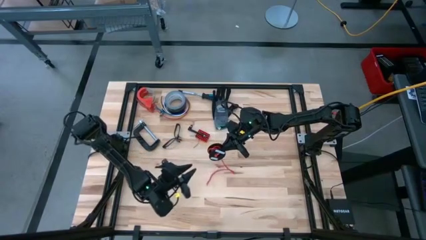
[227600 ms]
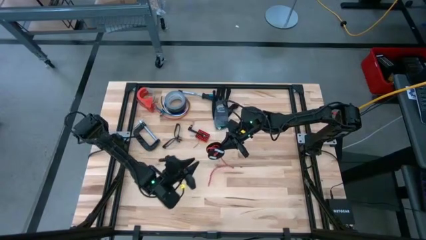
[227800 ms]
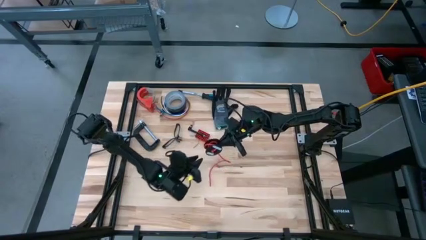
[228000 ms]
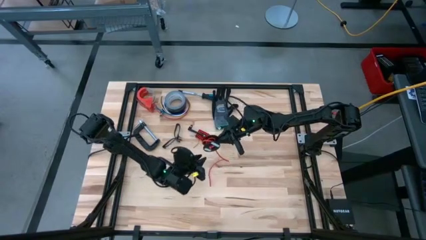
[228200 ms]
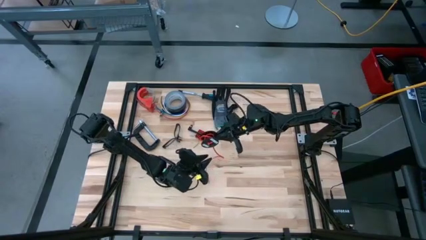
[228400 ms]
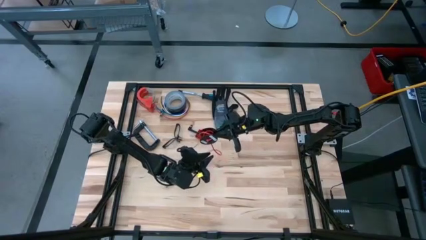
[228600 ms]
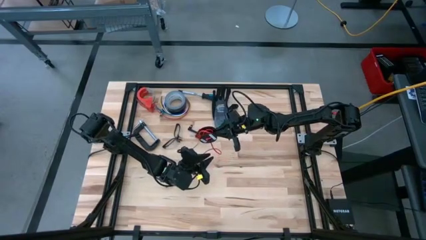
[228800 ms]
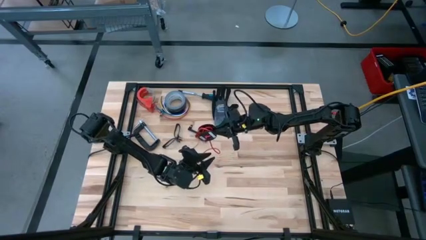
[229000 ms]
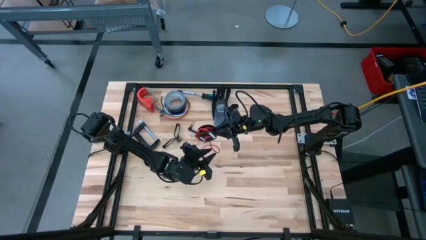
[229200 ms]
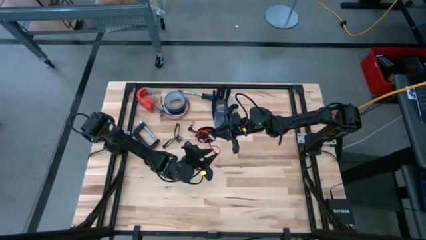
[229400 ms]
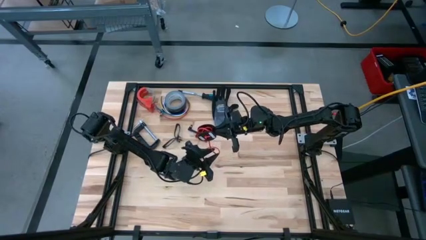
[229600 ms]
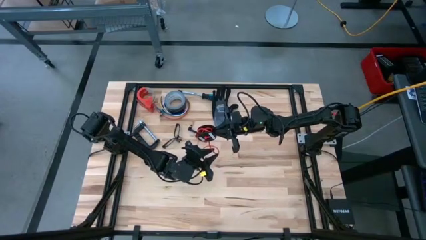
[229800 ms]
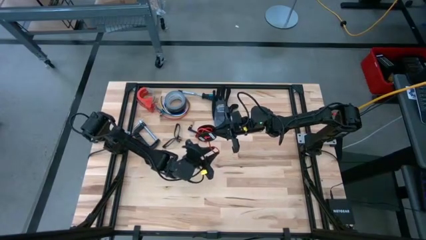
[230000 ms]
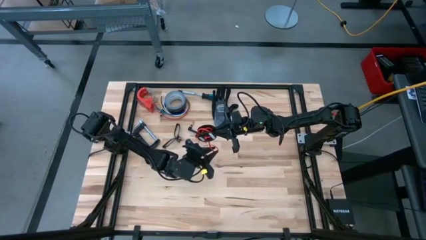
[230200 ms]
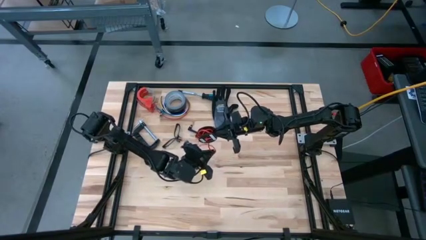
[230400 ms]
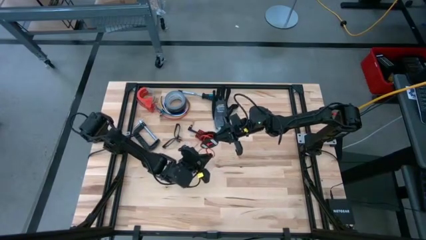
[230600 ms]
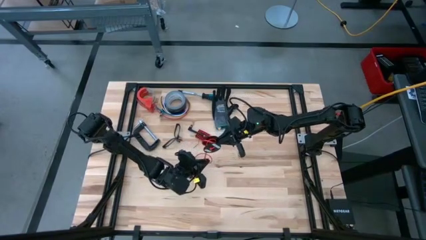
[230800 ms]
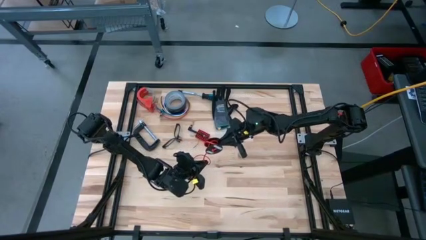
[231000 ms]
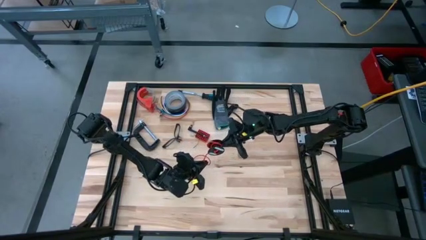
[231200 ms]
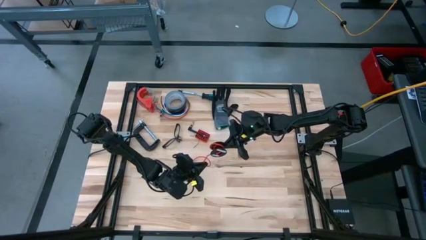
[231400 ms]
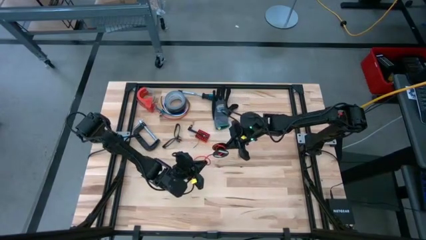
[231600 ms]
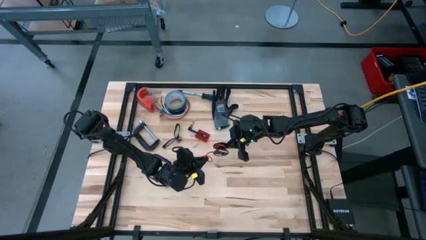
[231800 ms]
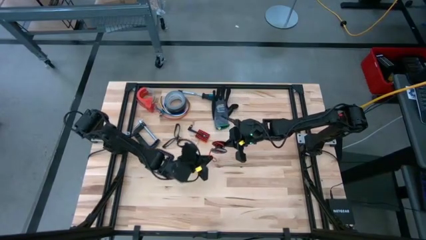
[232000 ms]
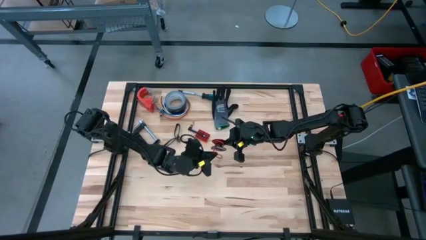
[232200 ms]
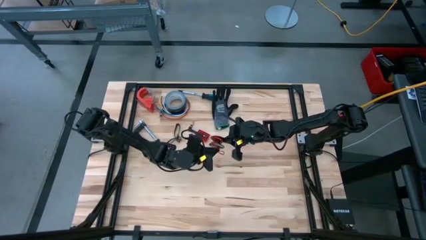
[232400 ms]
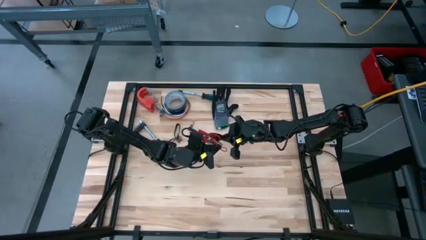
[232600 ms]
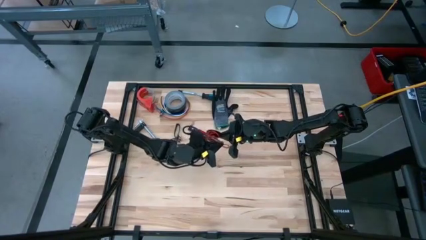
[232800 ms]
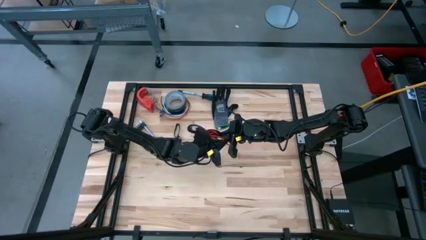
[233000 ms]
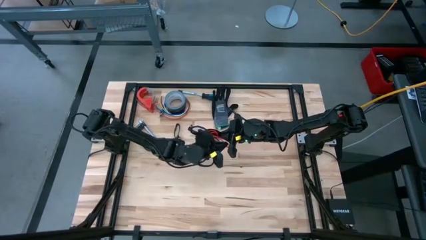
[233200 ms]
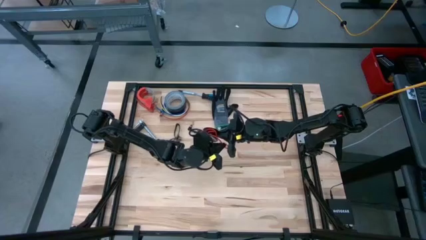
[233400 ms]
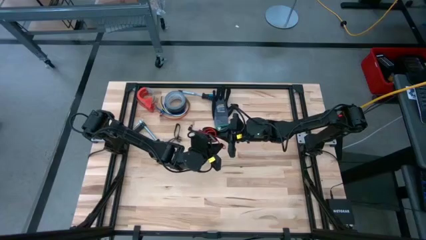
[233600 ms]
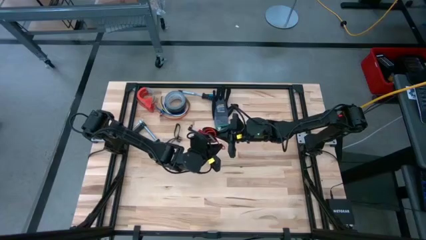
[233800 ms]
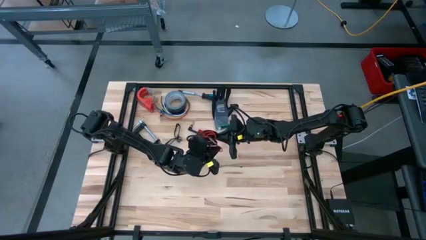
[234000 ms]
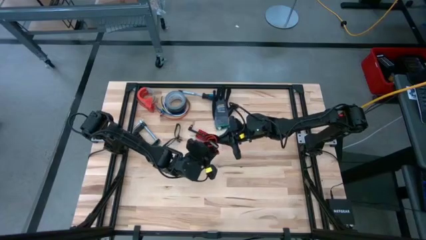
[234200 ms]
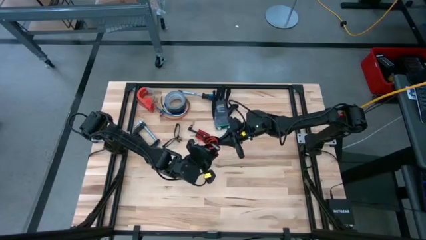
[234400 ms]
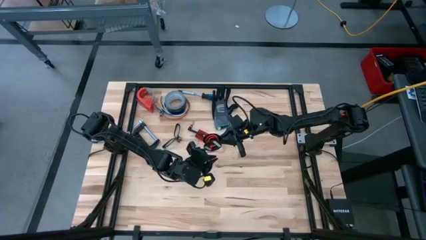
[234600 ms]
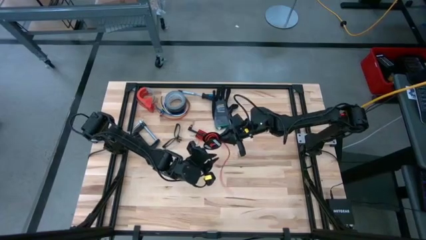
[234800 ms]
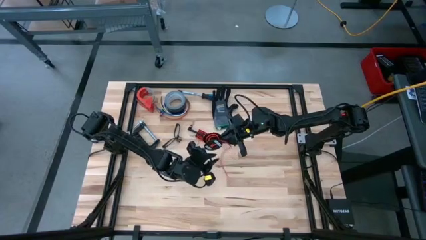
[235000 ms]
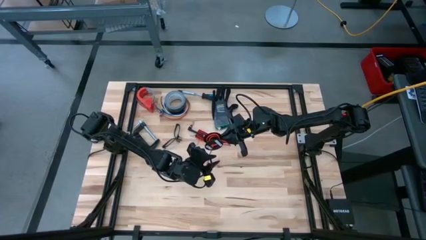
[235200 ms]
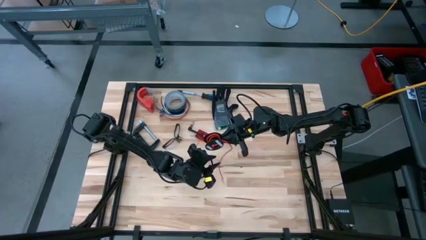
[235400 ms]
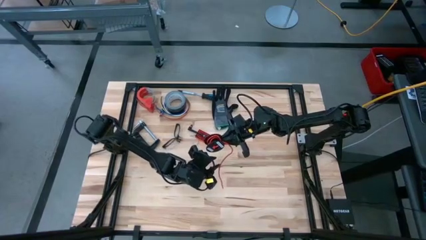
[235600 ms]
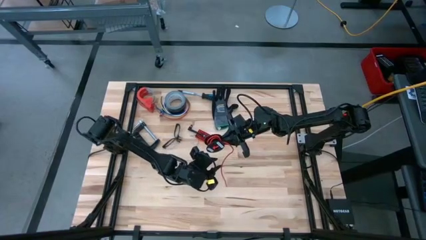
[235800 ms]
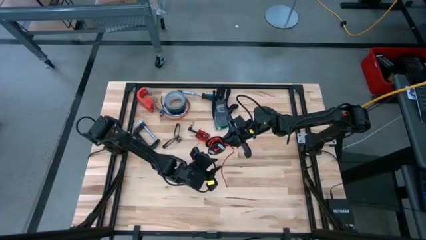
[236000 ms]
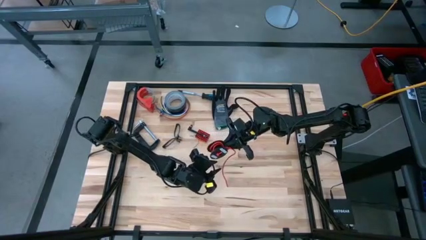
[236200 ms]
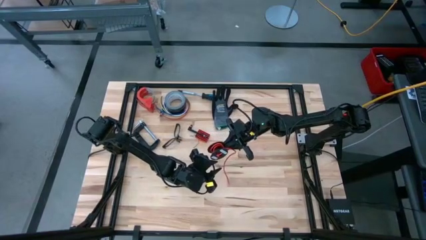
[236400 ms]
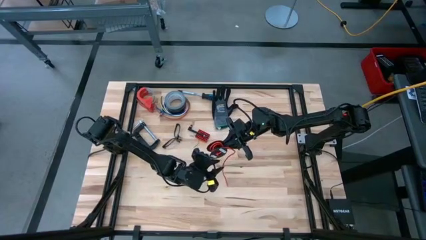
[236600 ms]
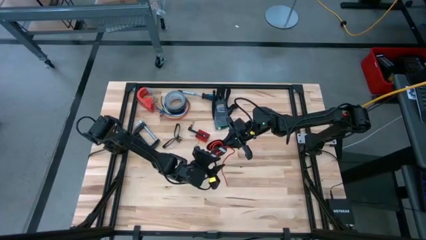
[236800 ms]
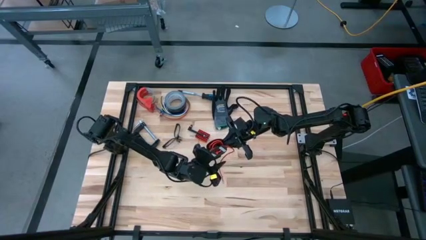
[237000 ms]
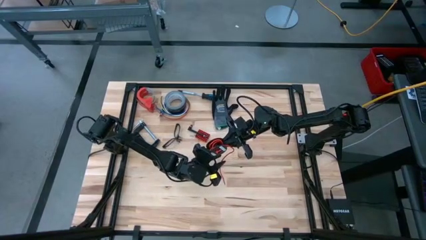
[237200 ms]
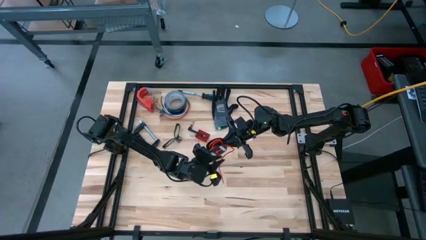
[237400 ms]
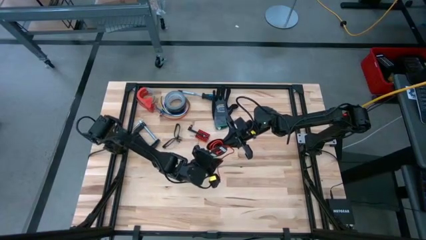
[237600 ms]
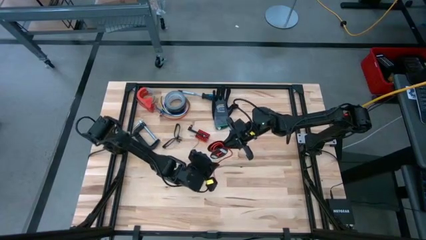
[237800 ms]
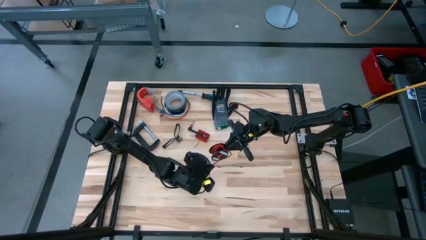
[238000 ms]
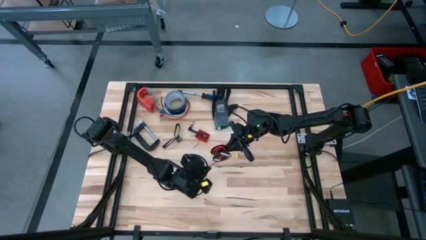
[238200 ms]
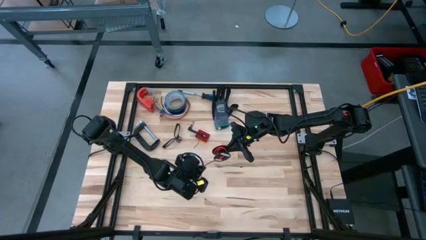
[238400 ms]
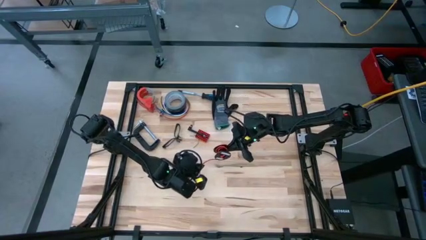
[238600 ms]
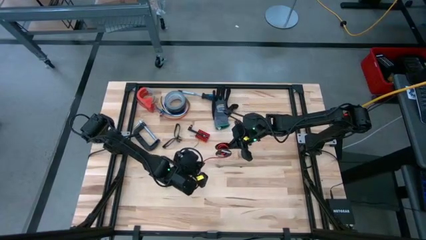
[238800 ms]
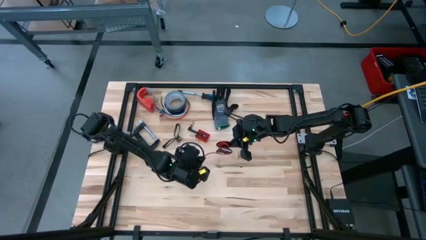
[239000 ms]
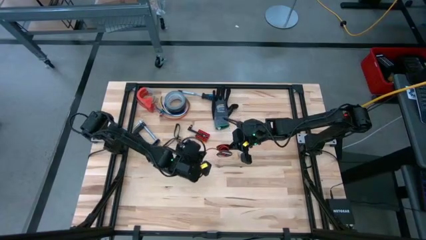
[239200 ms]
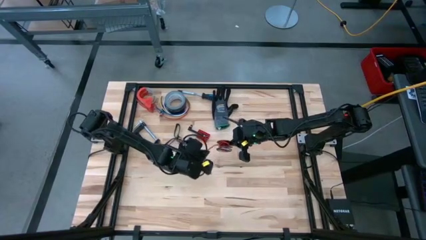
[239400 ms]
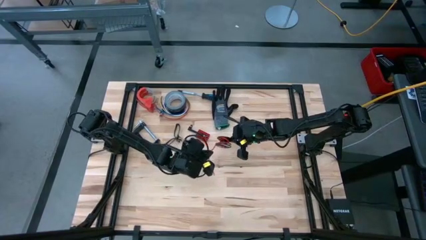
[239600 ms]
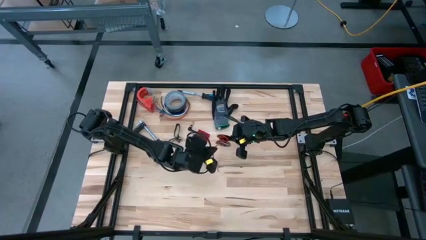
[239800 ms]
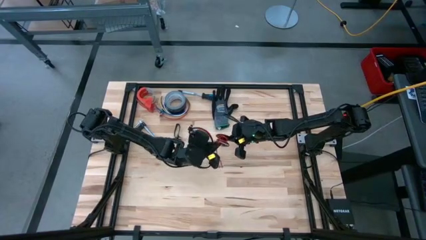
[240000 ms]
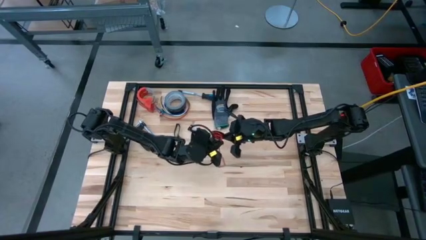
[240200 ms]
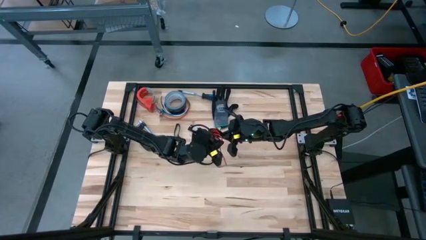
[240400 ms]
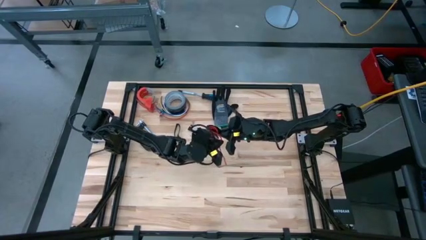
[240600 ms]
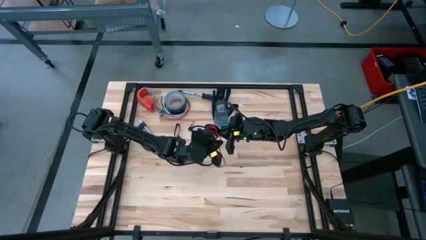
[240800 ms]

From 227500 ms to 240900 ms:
Task: Coil cords
Coil the orange wire into the black spool

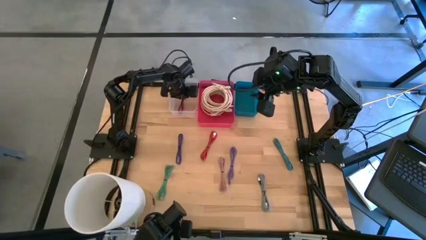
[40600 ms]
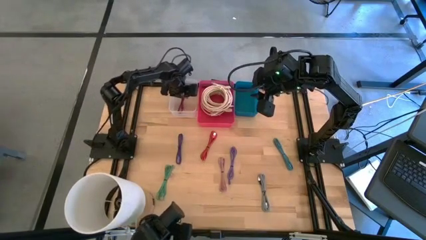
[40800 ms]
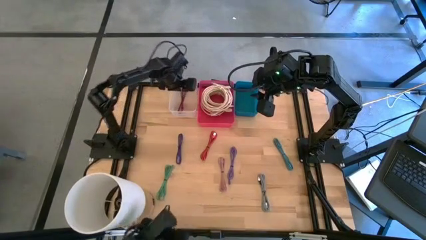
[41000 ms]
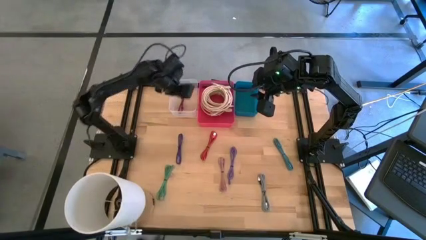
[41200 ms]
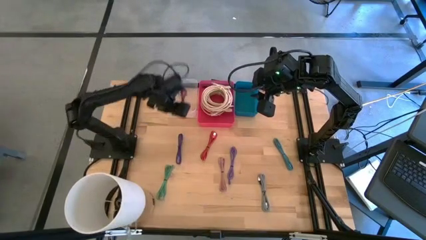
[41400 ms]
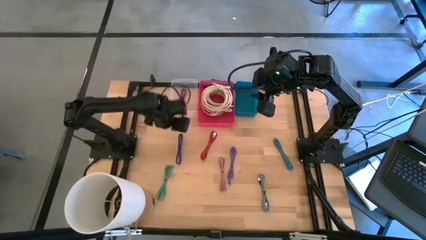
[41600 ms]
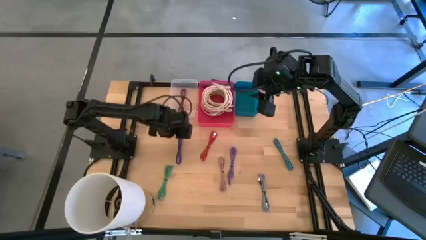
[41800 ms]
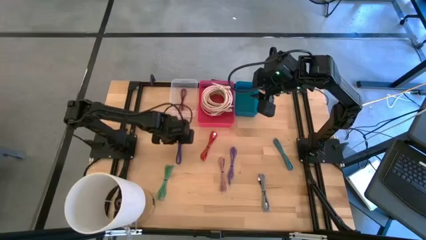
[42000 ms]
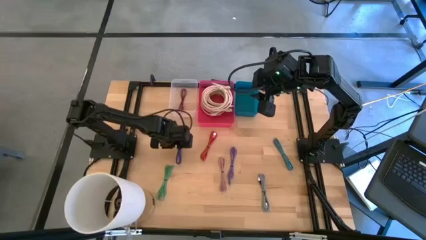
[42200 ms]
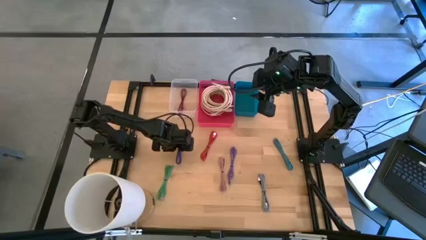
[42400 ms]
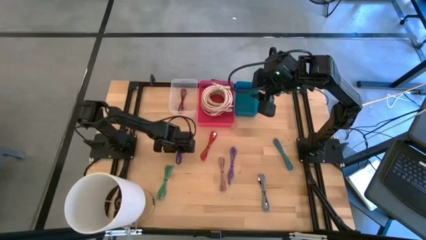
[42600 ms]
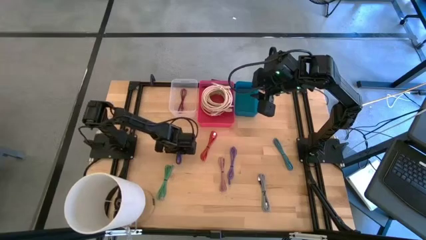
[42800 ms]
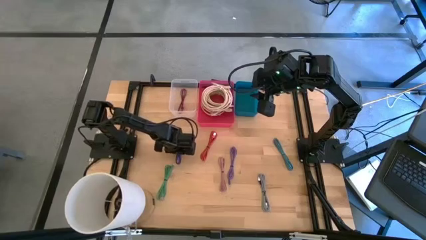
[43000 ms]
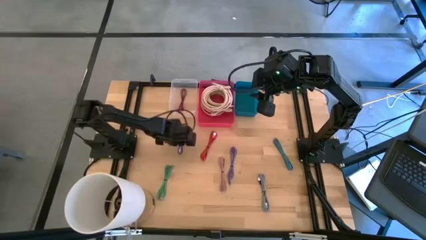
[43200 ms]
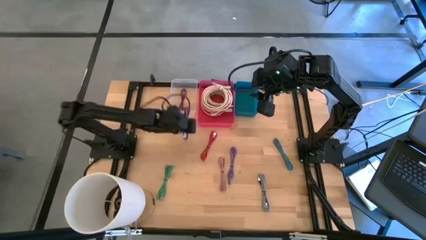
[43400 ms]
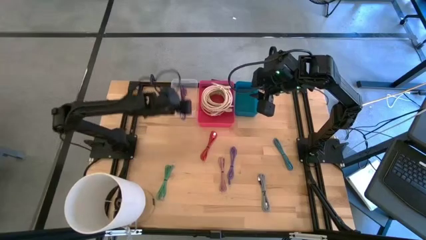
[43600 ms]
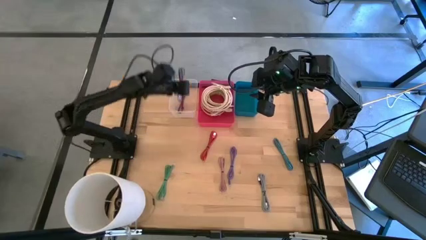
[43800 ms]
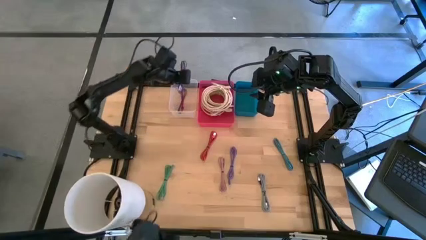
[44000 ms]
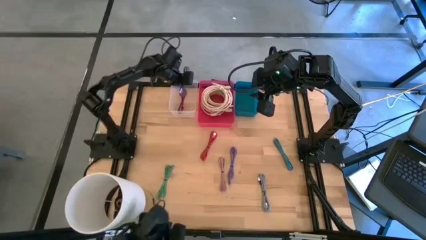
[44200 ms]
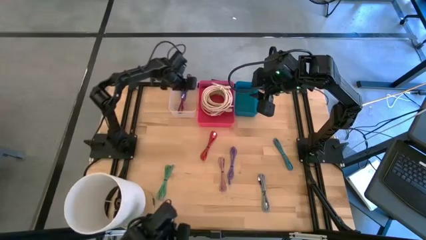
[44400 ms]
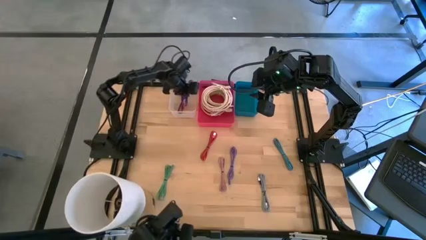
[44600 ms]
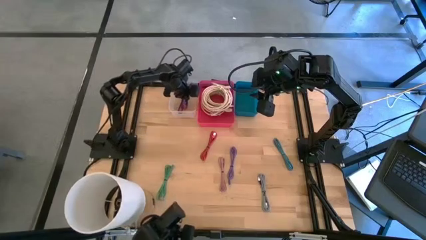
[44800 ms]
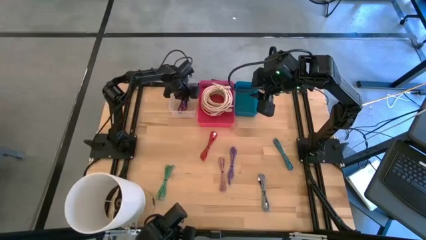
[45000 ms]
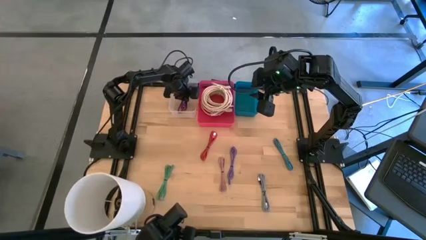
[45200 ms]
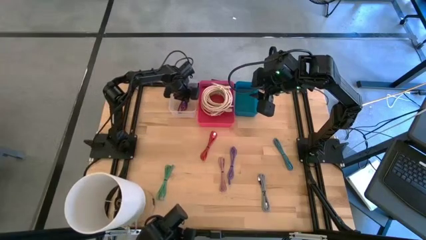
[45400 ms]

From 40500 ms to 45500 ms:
Task: Pick & Place USB Port
Put the purple charger cable into the transparent bin
